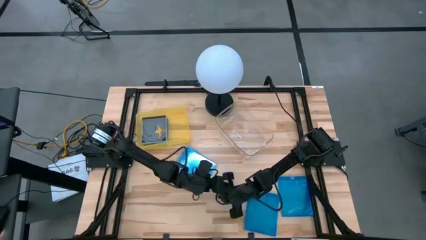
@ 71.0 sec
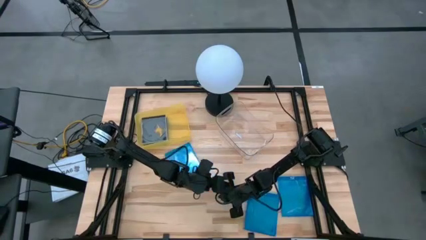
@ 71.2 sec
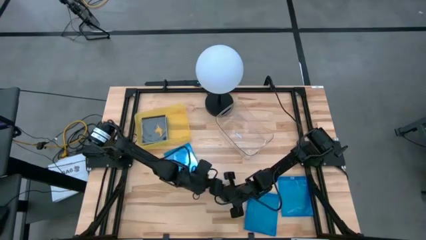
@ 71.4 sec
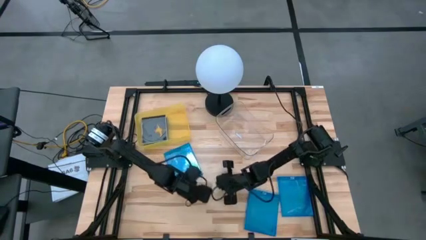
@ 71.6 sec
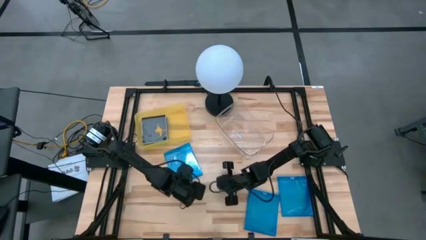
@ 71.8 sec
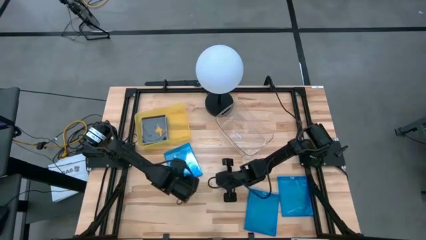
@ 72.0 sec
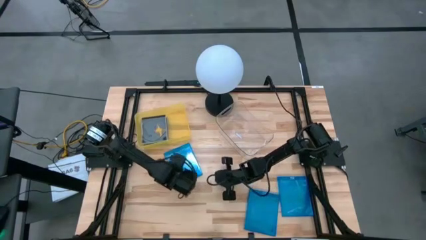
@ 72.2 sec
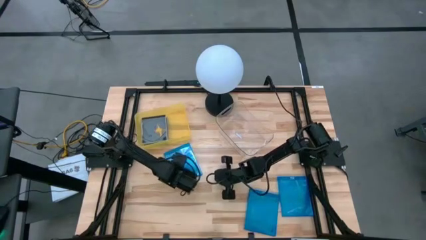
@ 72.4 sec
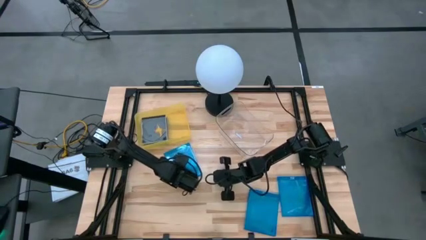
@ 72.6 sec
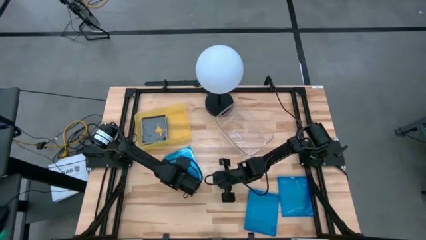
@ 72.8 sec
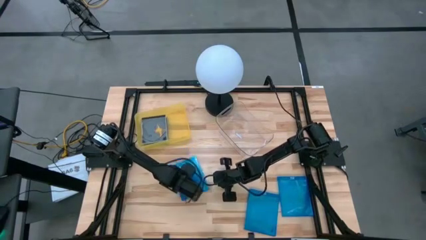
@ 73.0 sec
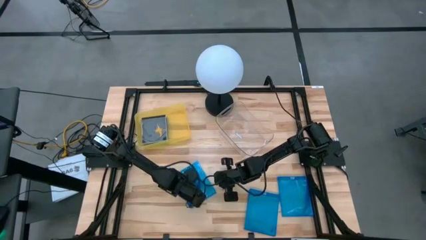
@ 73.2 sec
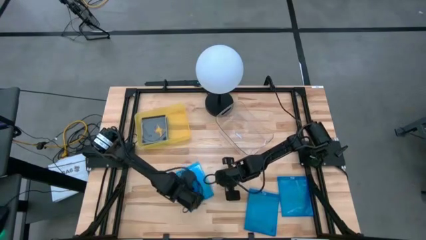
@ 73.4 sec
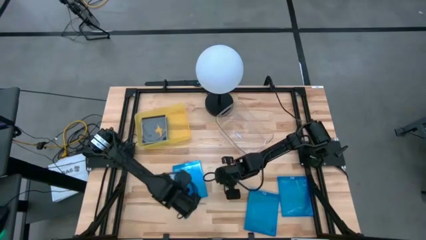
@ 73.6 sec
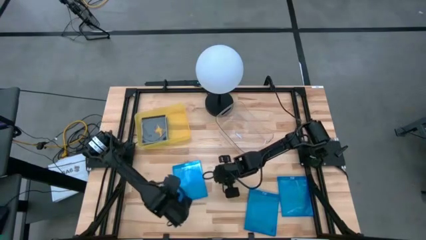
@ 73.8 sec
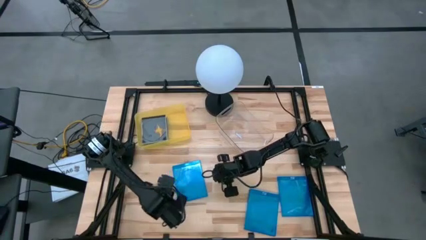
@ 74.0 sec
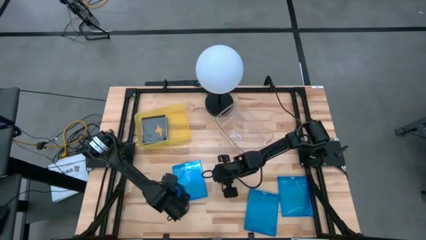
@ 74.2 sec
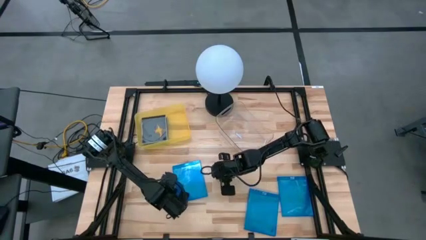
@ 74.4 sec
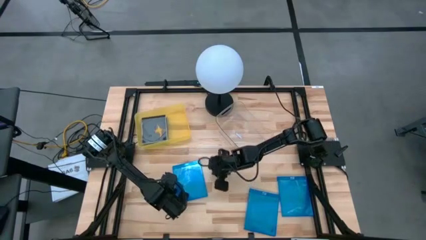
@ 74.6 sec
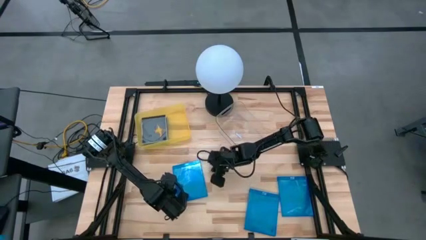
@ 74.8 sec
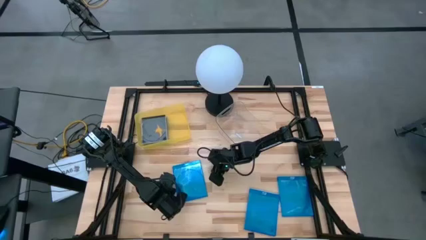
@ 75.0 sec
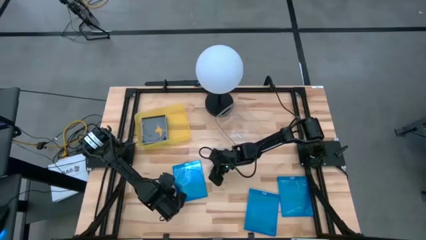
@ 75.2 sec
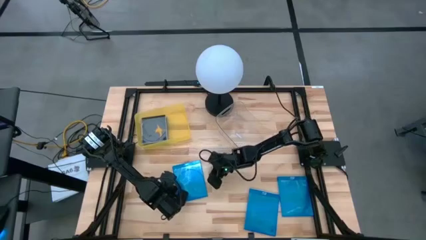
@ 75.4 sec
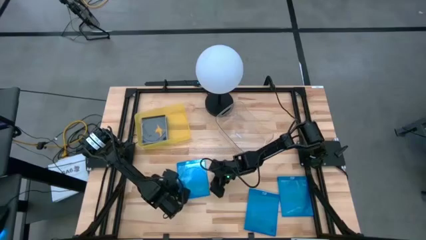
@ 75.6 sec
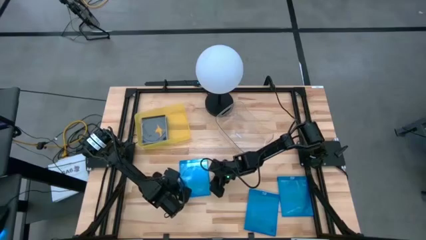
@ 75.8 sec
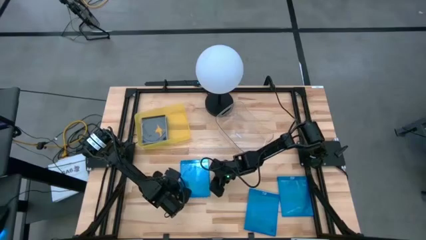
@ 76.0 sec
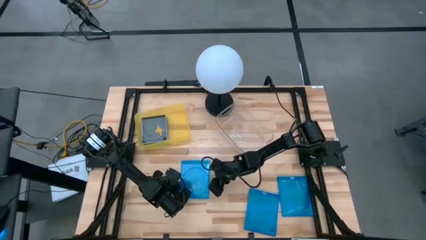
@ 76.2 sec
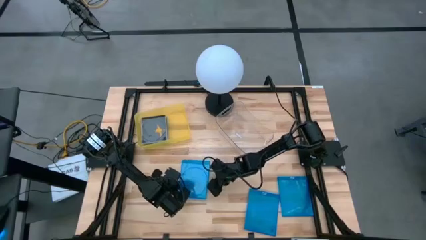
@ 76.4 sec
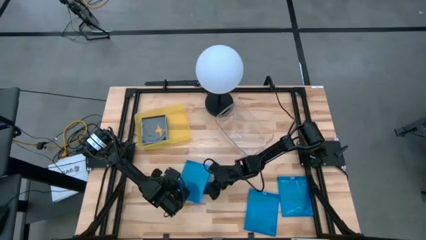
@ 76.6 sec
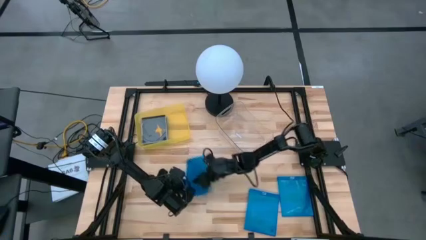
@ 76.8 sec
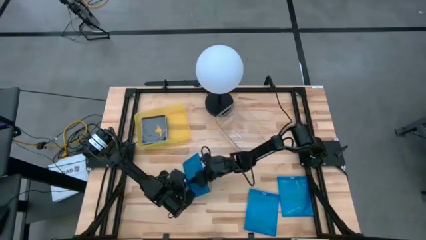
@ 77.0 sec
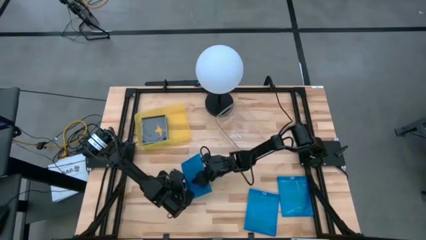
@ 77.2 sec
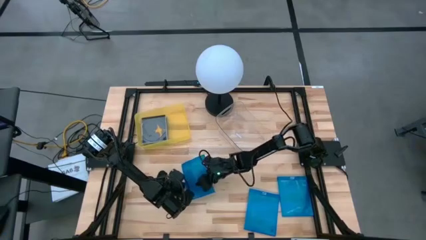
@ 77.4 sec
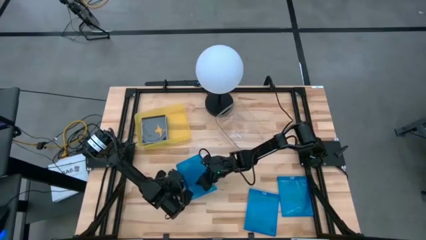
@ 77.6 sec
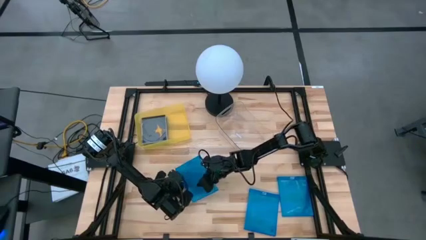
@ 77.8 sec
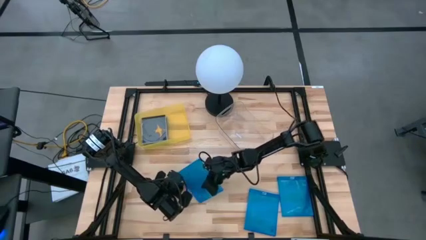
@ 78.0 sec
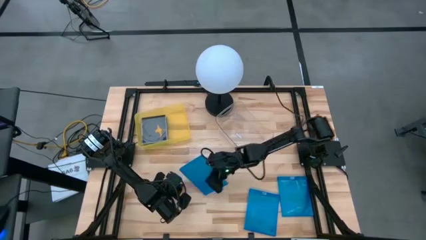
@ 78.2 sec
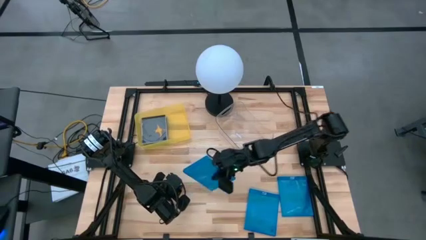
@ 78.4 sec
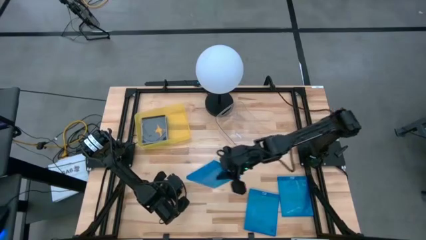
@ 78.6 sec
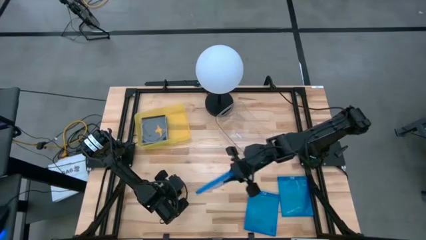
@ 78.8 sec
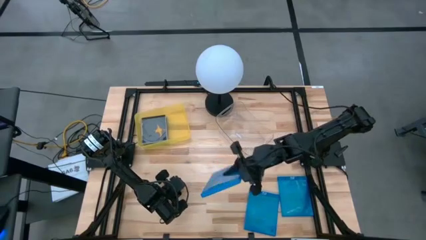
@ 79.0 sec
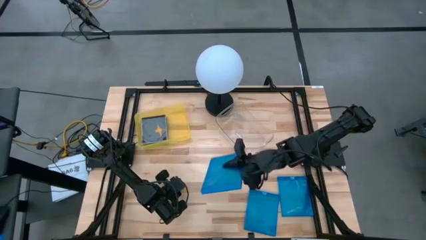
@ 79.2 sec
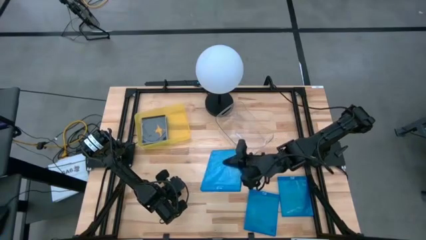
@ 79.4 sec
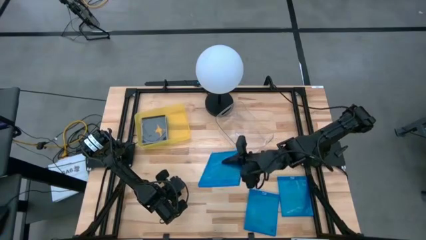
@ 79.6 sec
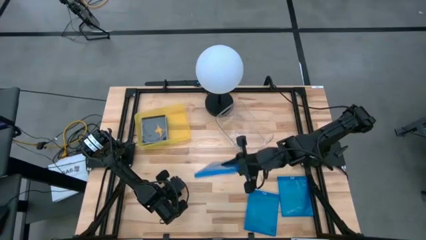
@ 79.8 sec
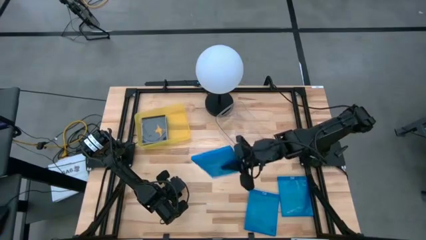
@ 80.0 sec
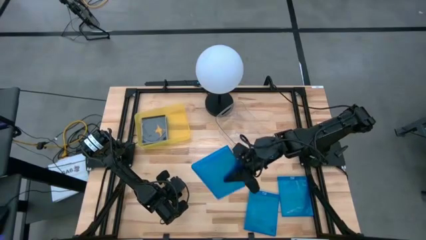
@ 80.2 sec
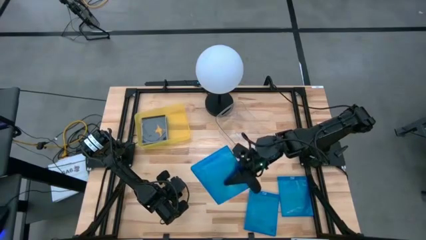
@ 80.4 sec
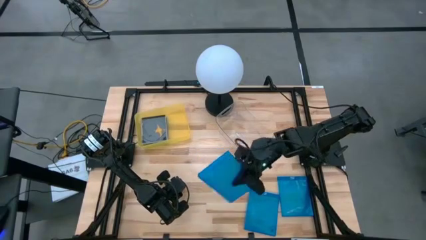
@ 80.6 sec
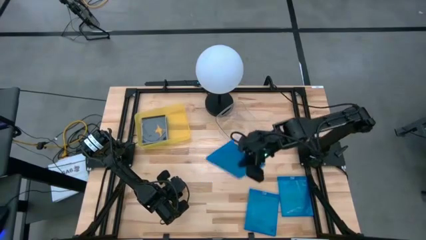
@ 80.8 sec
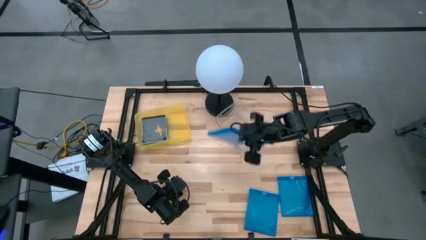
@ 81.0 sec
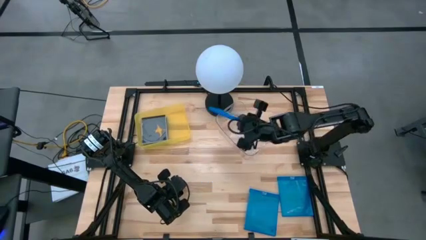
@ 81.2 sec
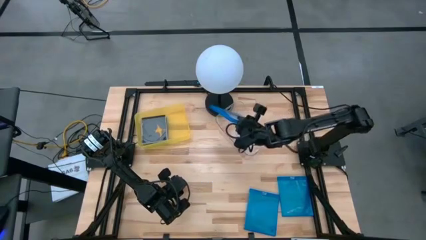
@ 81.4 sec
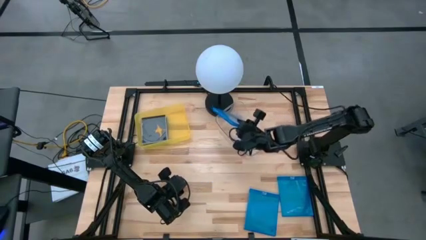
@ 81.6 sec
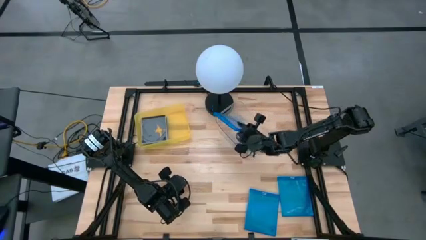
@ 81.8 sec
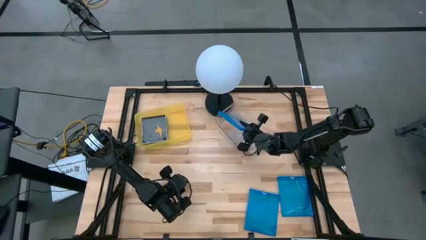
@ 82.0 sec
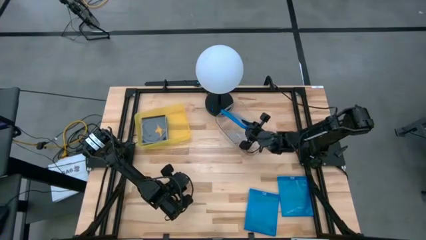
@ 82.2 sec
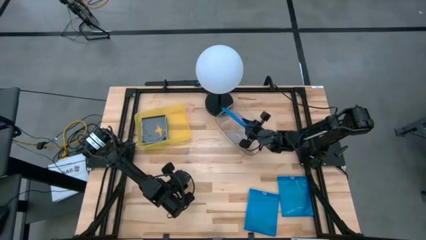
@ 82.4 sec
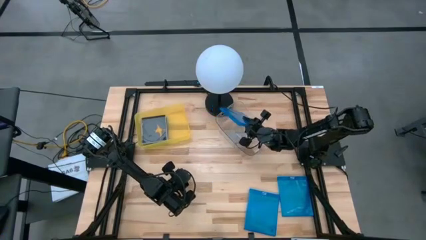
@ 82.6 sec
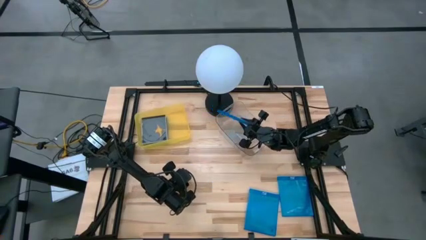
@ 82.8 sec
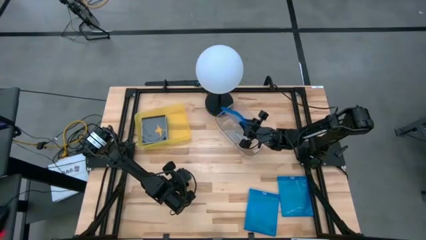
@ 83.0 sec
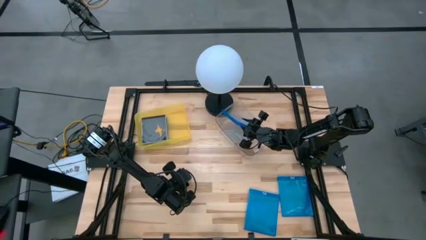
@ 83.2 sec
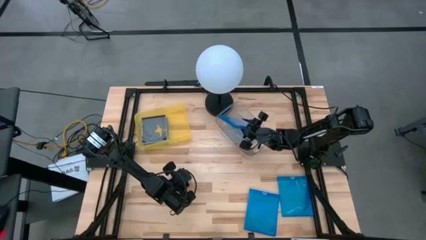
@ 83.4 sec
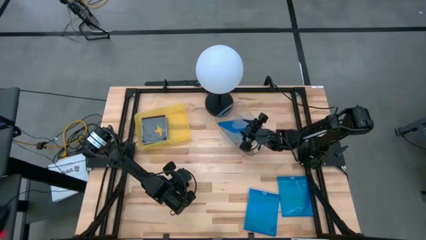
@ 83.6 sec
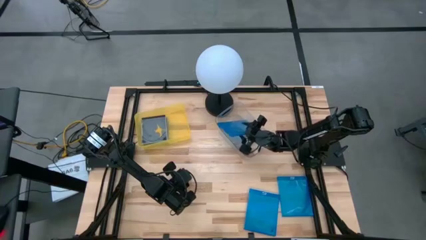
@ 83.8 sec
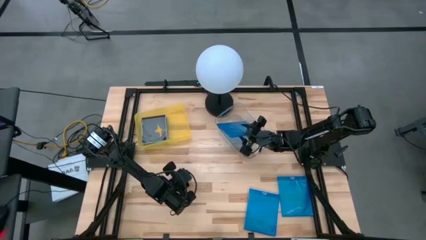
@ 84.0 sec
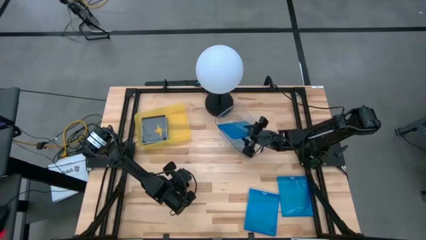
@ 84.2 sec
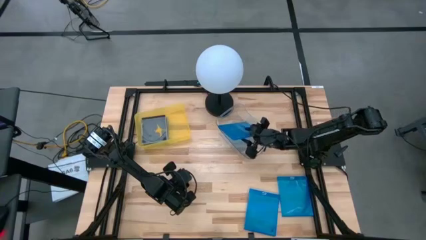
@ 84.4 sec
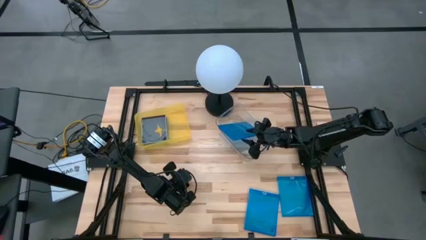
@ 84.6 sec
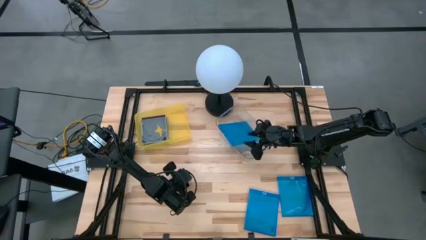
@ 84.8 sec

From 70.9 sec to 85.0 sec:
Task: Pick & place jewel cases by type
Put the left blue CD case into the transparent bin

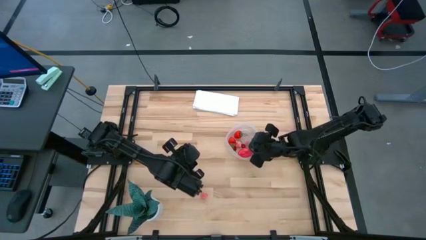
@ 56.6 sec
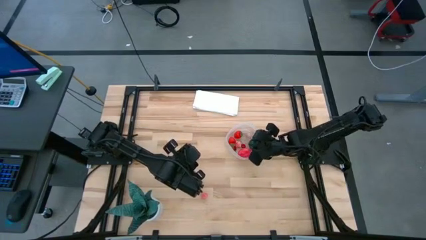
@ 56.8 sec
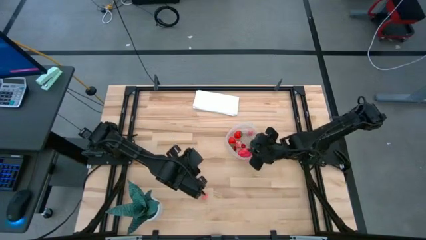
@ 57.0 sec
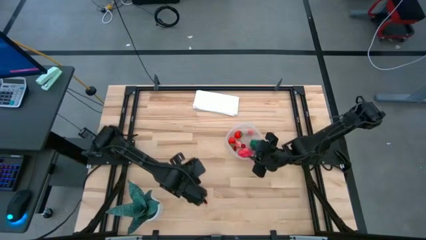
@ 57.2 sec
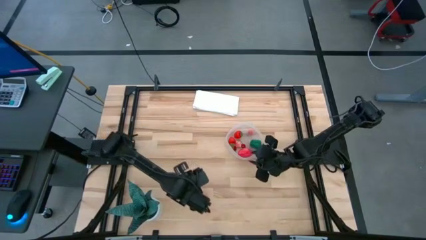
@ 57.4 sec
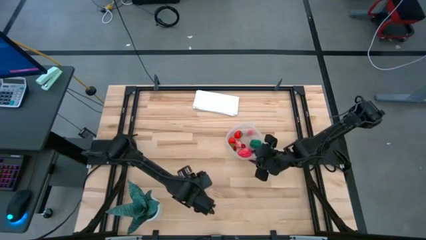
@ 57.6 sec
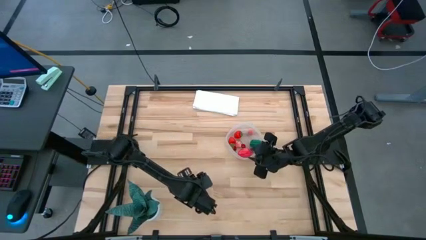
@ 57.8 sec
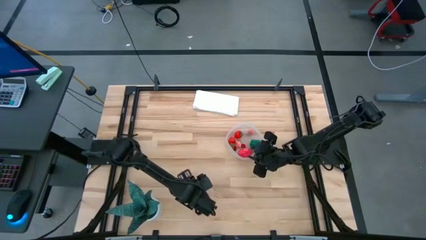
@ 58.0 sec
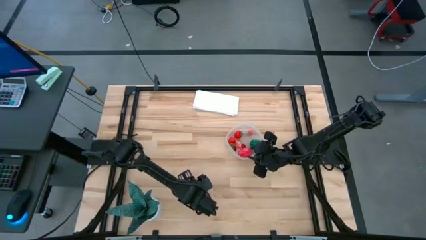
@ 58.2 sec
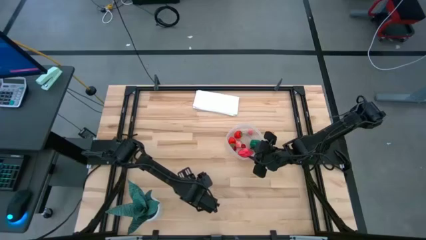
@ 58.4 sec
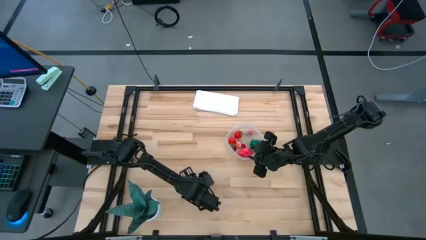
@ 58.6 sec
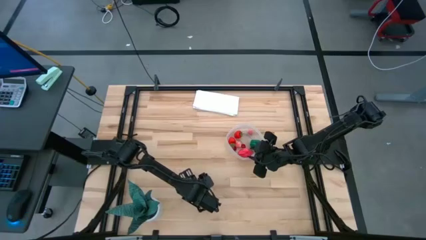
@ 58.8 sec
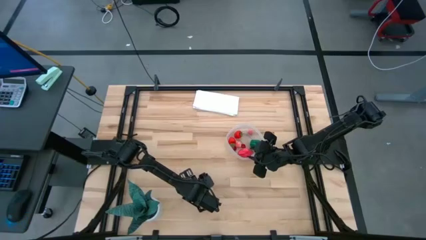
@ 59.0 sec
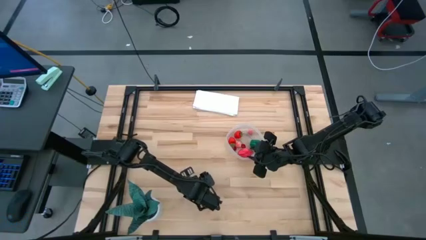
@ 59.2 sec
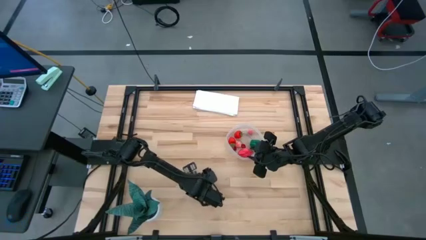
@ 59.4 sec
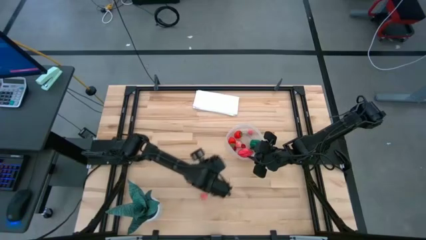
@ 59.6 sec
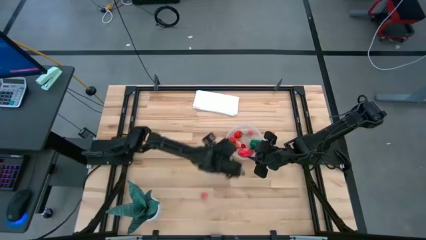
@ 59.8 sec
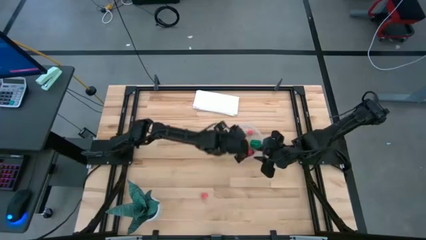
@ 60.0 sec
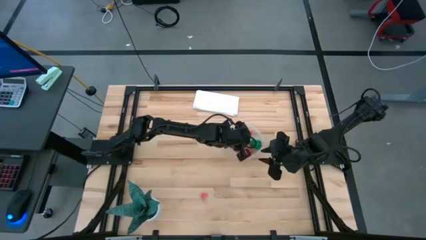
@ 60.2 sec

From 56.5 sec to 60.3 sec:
Task: Pick and placing Produce into tupperware
Put the top pink peach into the transparent bin
